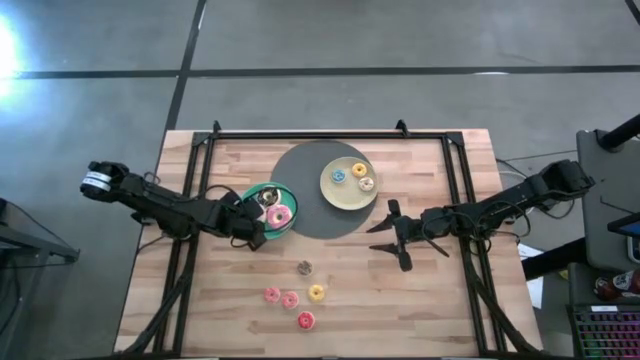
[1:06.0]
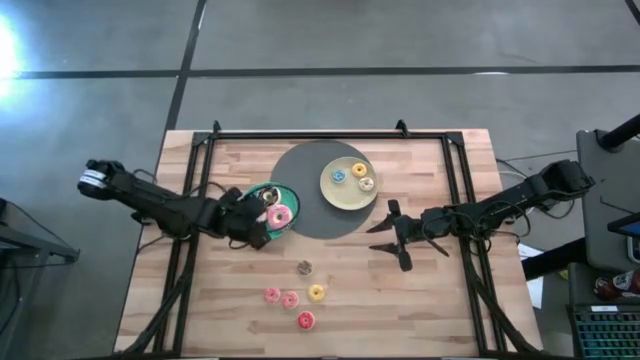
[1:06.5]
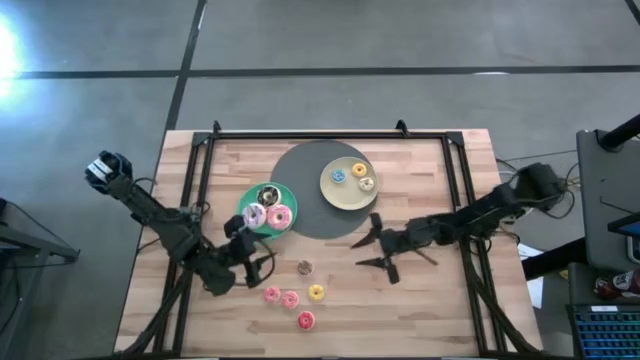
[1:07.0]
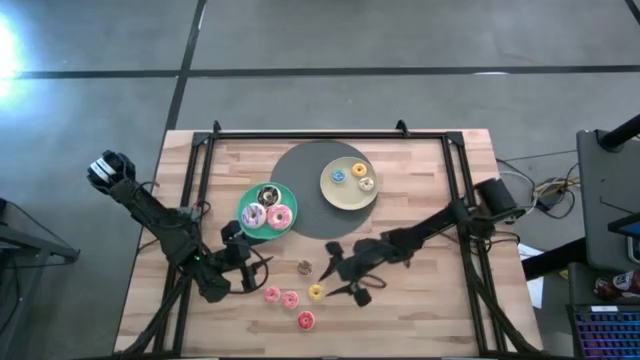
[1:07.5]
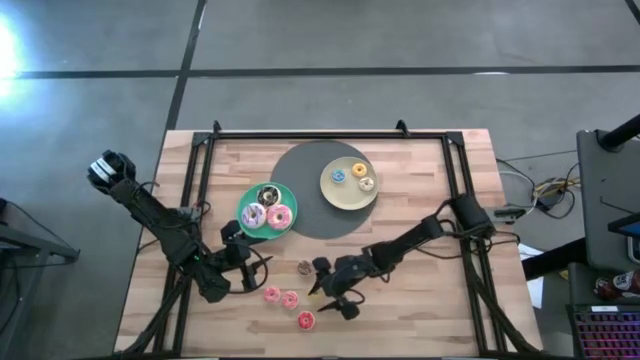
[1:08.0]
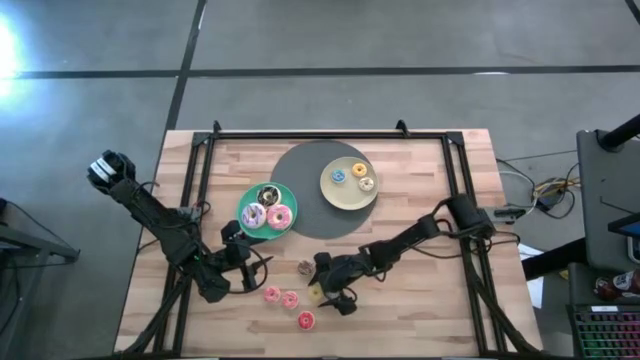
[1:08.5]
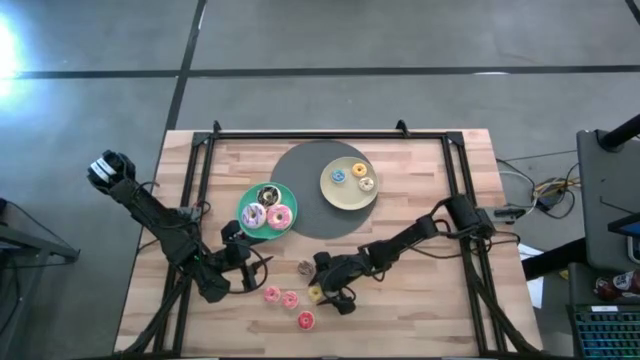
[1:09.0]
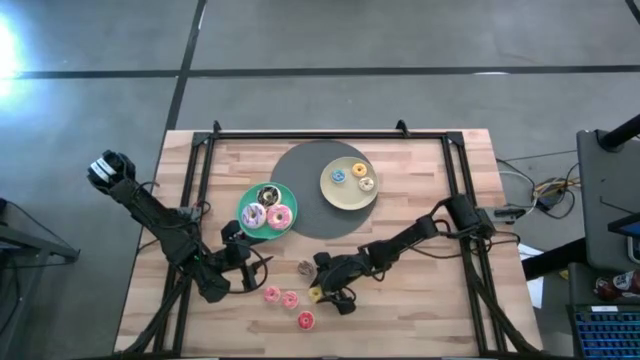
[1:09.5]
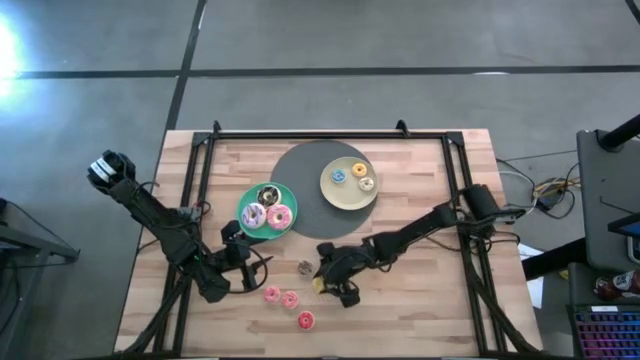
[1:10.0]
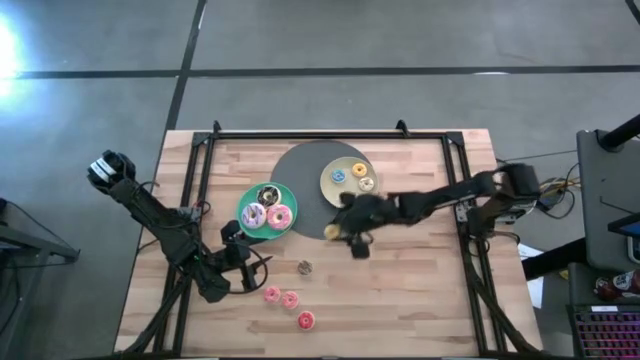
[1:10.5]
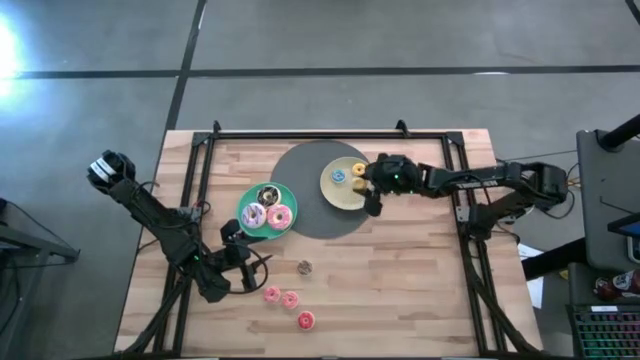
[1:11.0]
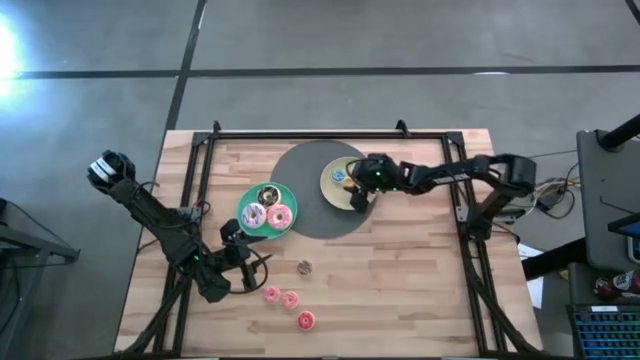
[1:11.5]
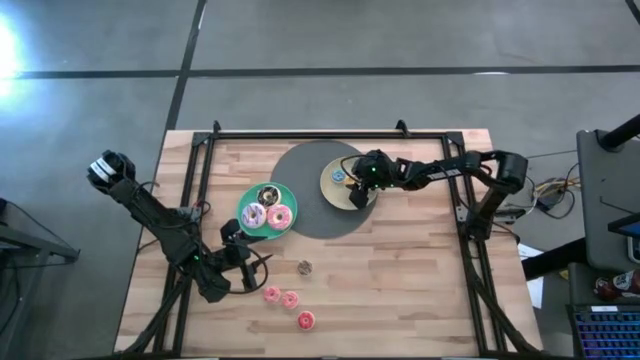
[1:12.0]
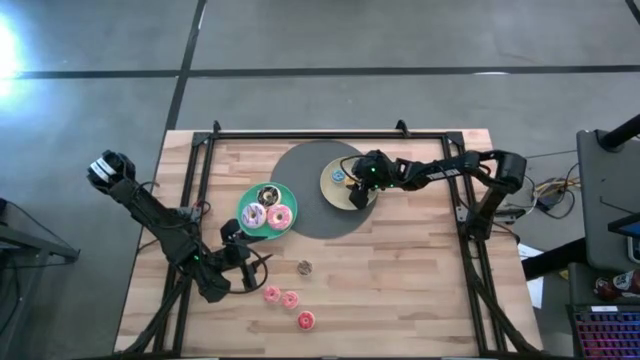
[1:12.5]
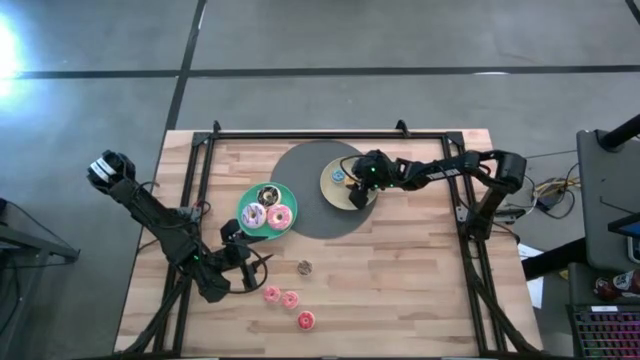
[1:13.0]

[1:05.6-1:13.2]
Task: Pick & Place donuts
Put the small yellow donut on the brown plate

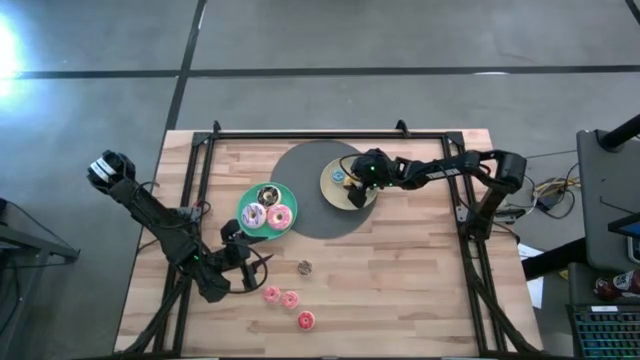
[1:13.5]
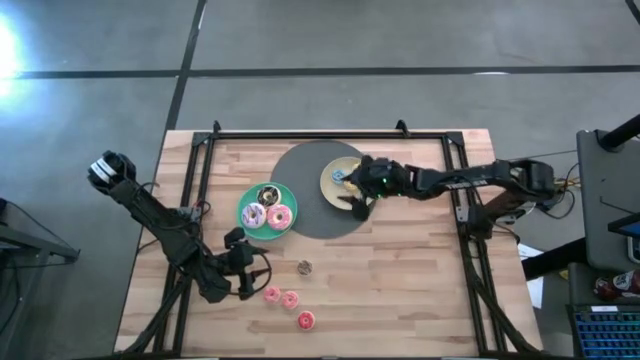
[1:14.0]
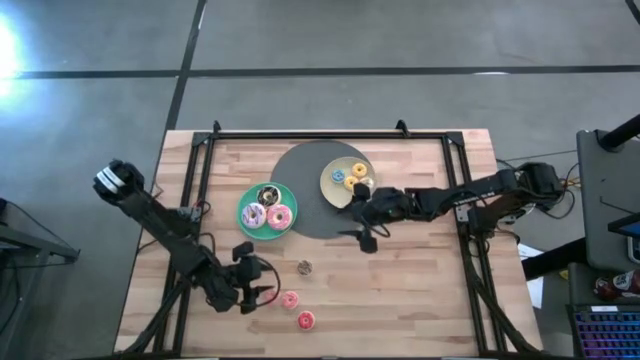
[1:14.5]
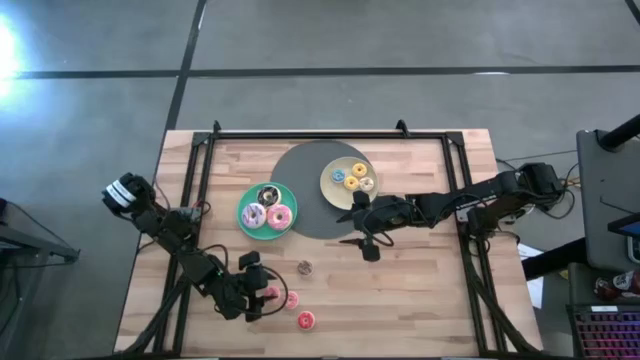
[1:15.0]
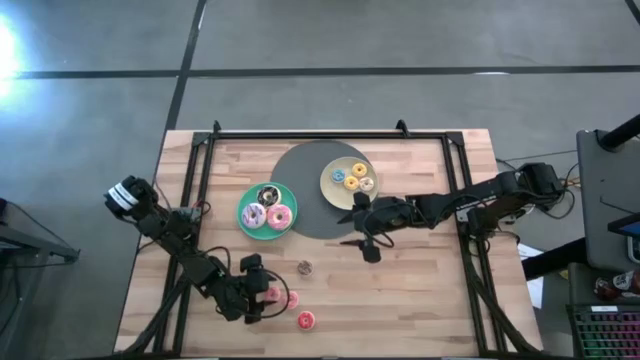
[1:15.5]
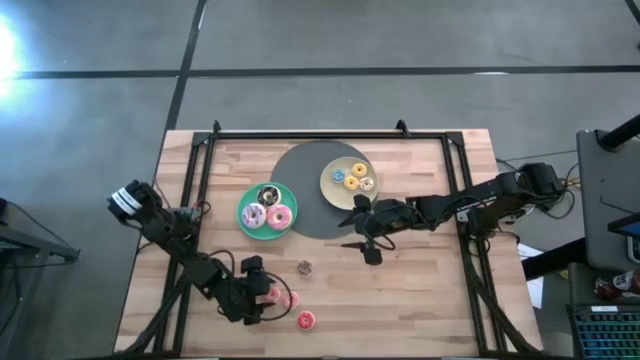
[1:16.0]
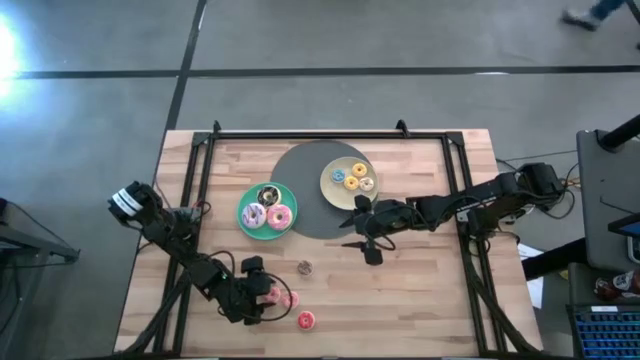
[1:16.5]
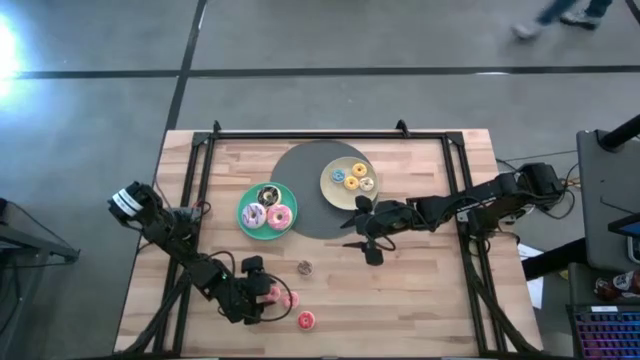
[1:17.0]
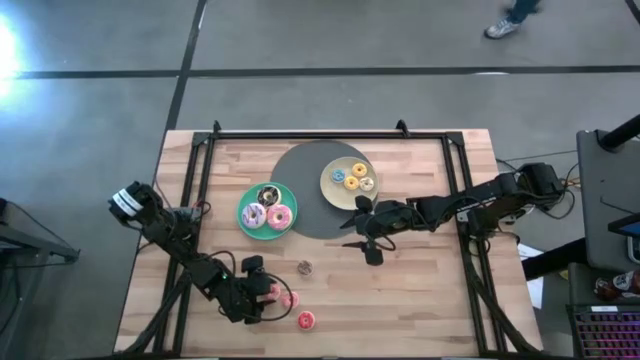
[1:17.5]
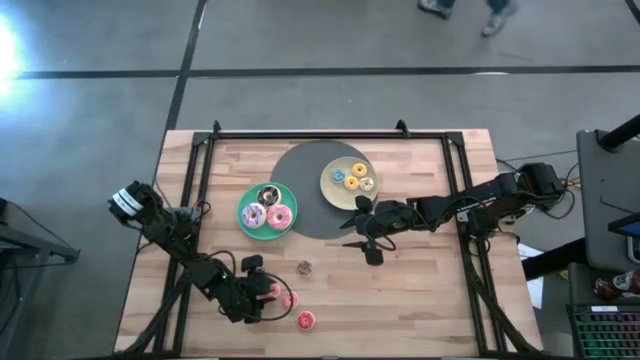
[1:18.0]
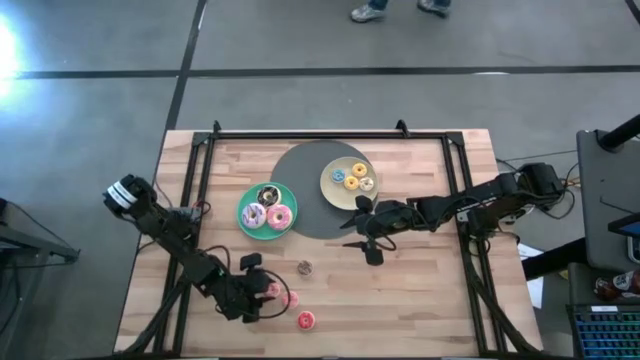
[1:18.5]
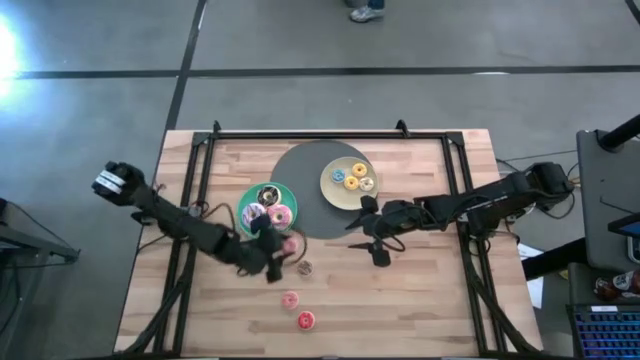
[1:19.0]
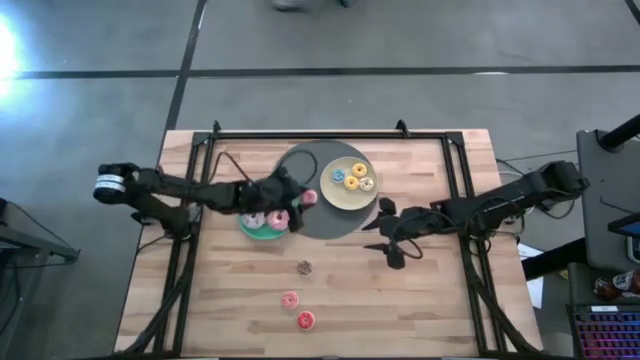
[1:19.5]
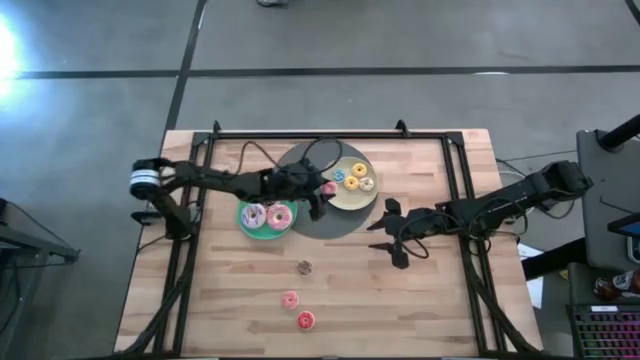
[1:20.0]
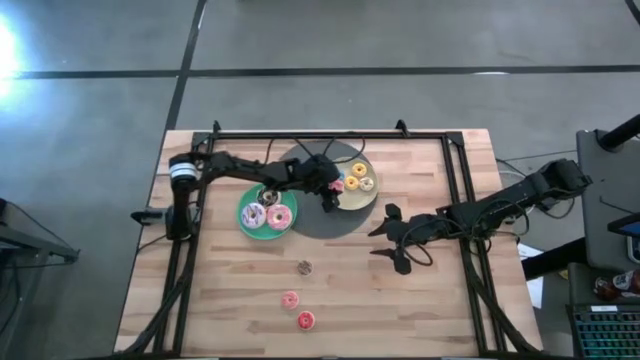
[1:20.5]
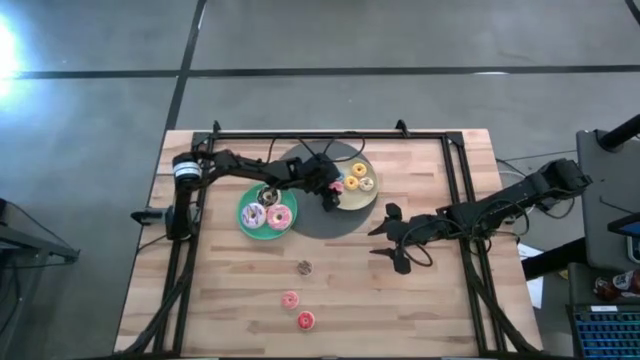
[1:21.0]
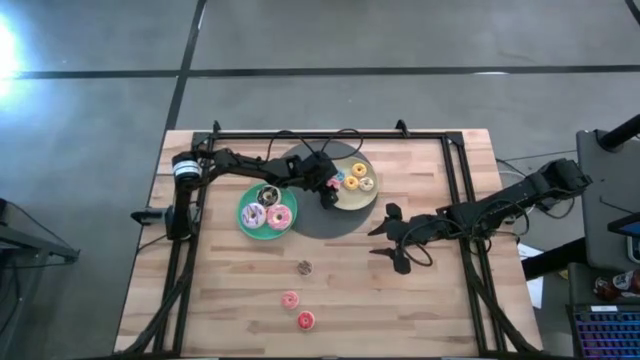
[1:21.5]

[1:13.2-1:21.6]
Put the left small pink donut on the brown plate

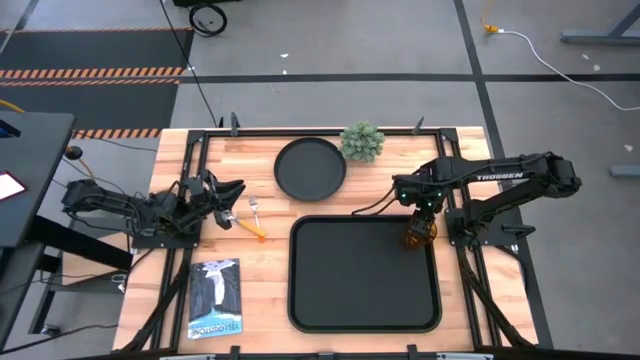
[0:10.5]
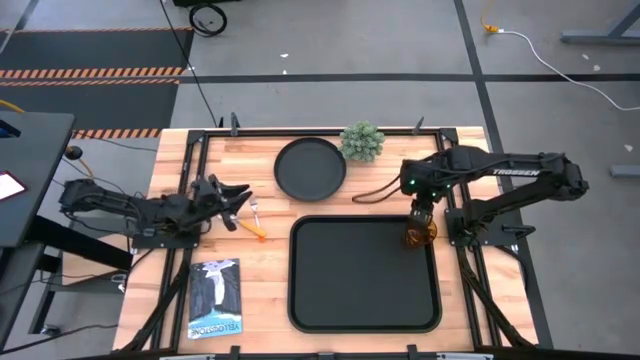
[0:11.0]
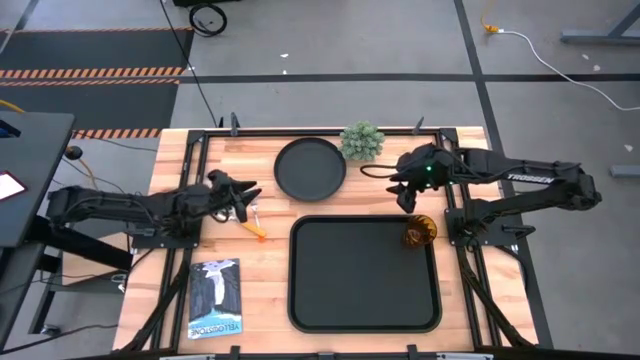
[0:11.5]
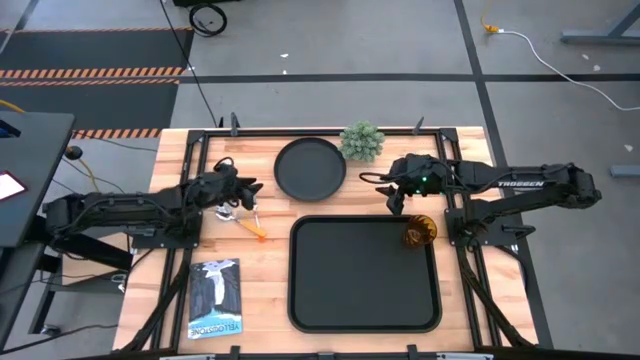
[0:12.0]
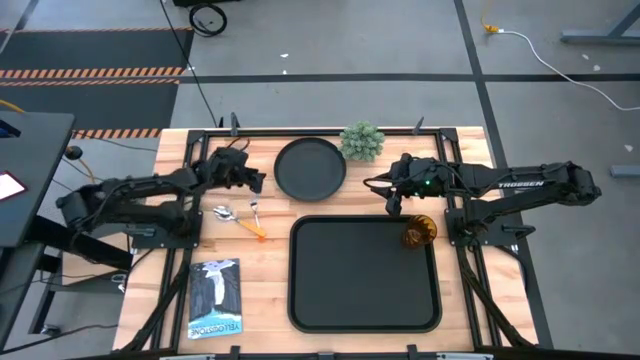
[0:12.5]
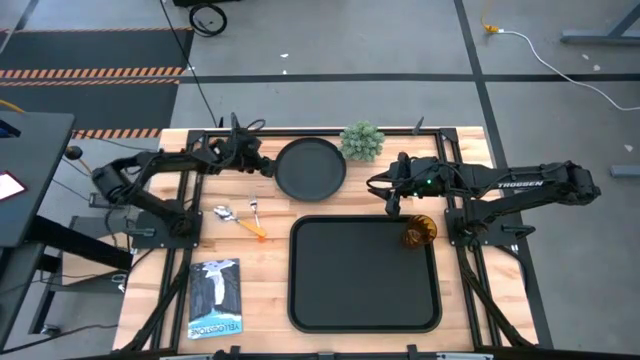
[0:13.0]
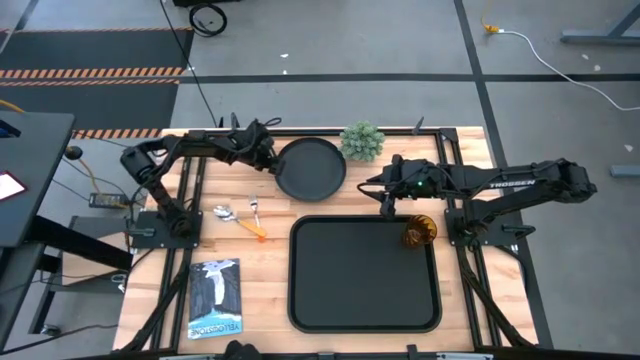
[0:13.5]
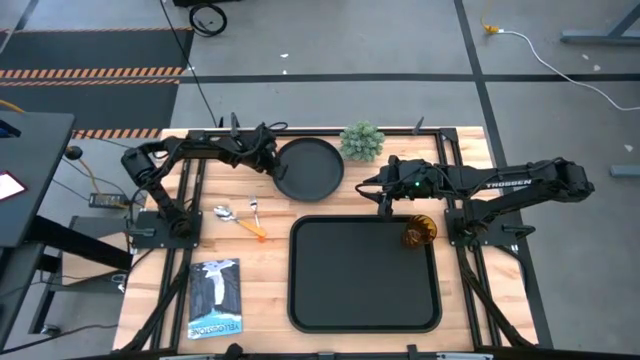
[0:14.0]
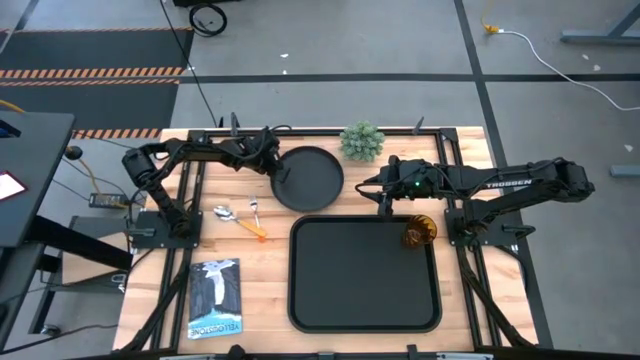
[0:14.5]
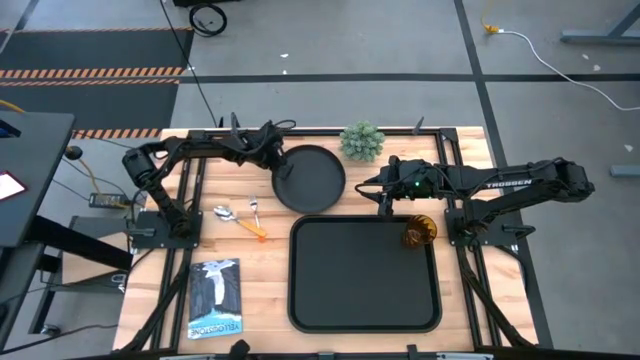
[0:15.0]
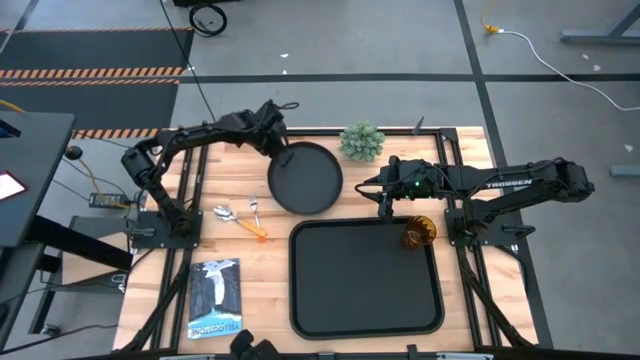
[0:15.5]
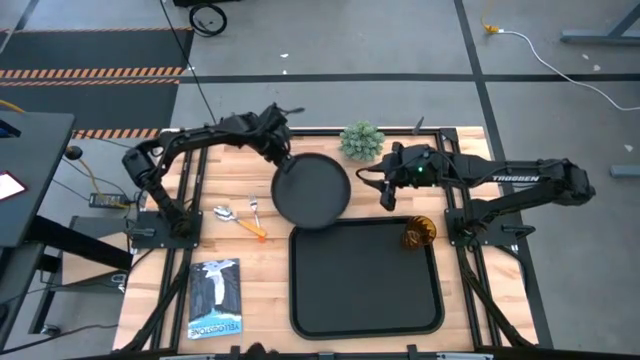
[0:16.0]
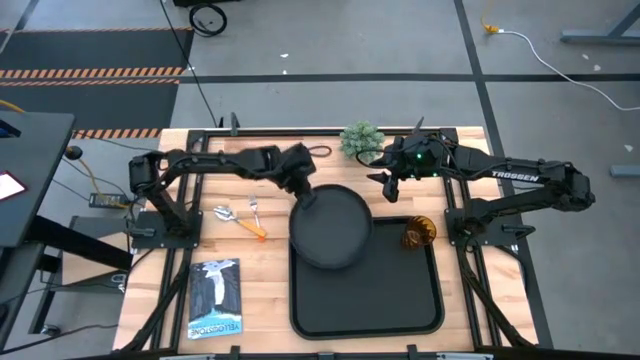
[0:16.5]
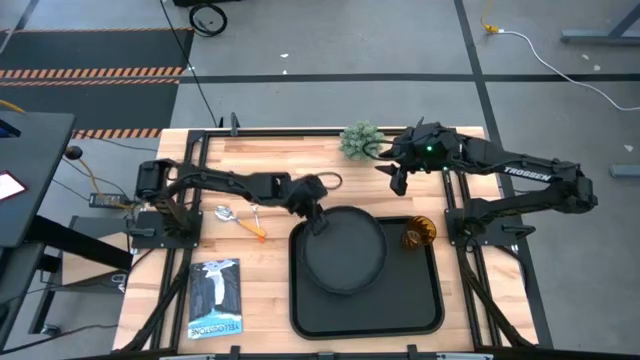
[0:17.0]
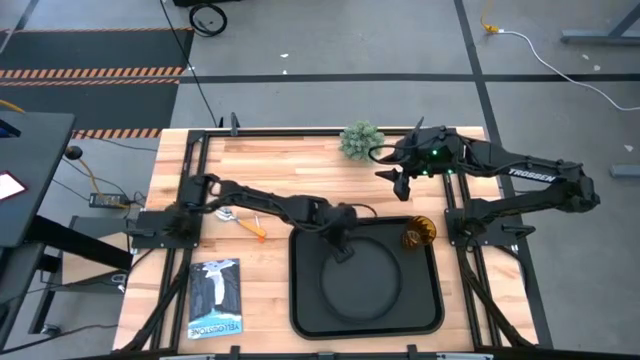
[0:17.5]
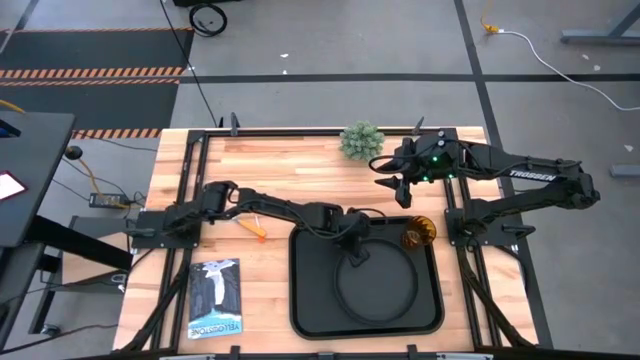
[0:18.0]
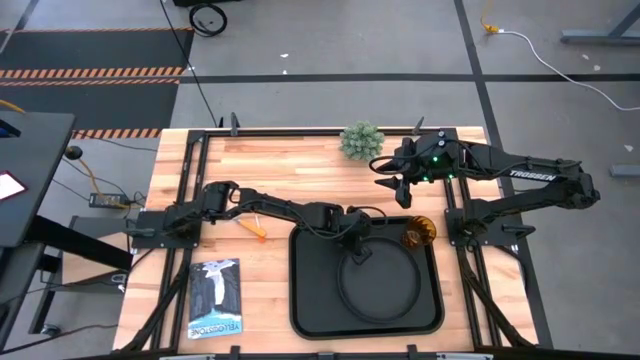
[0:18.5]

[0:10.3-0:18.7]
Task: Pick and place plate/cup/fork/spoon on tray
Put the black plate on the black serving tray to the bottom of the brown cup
